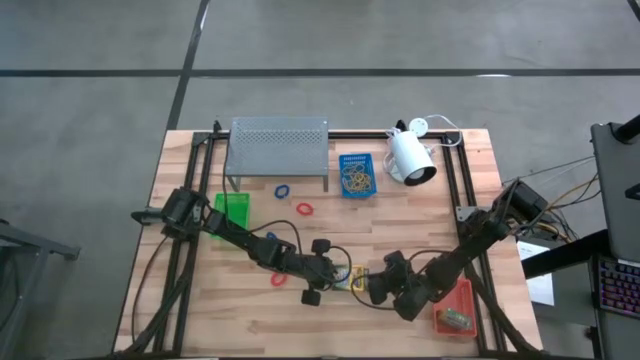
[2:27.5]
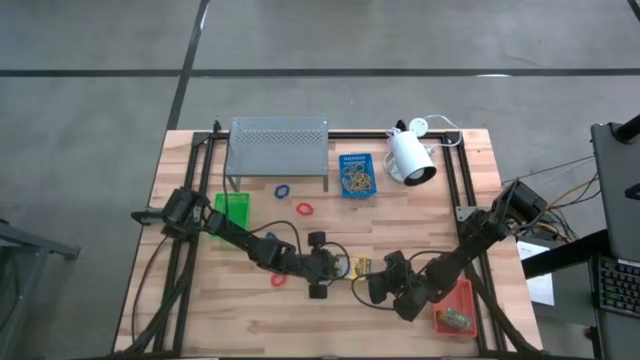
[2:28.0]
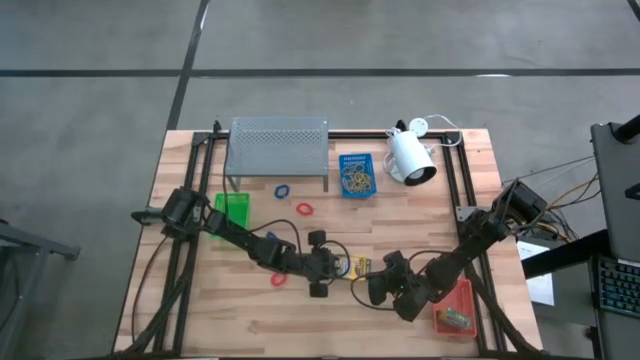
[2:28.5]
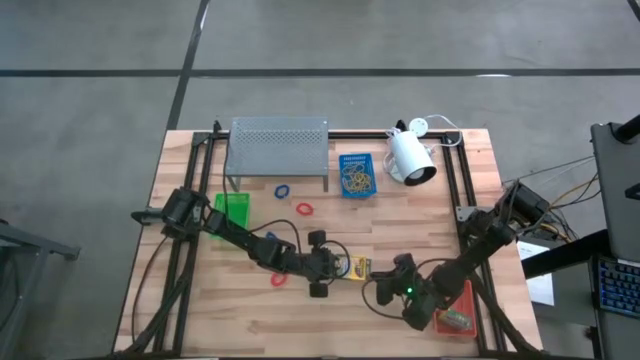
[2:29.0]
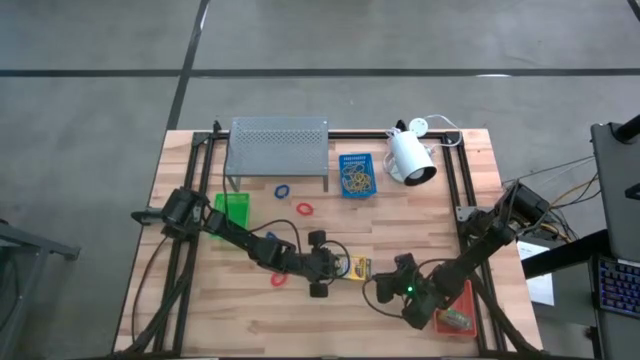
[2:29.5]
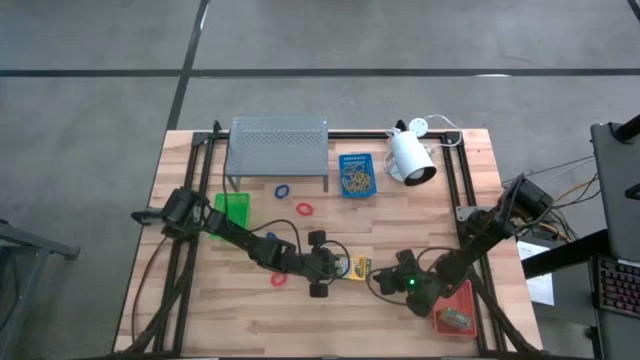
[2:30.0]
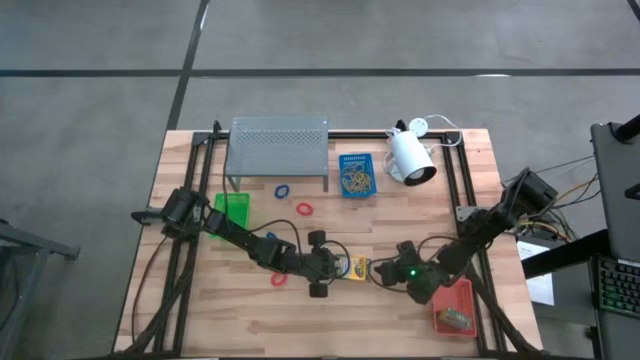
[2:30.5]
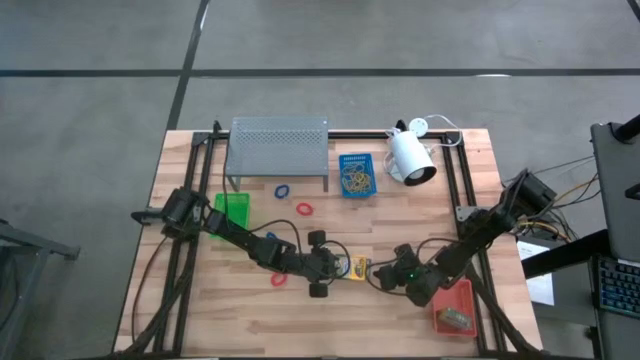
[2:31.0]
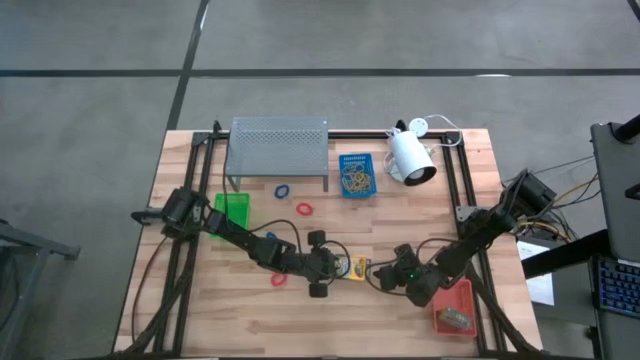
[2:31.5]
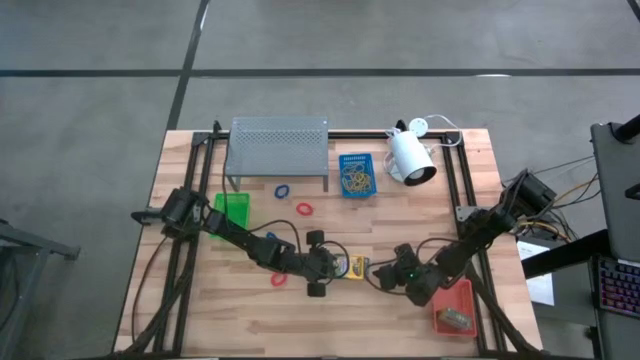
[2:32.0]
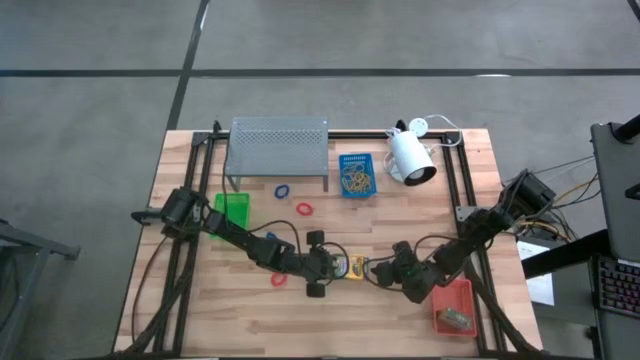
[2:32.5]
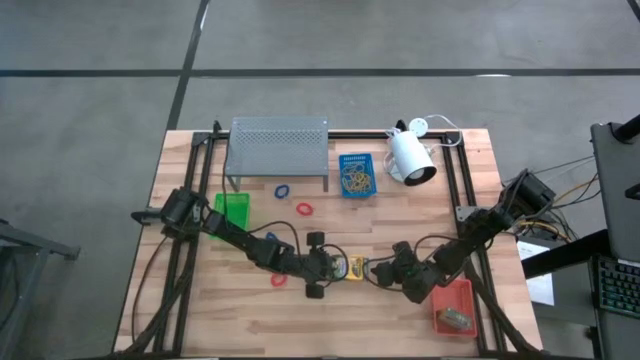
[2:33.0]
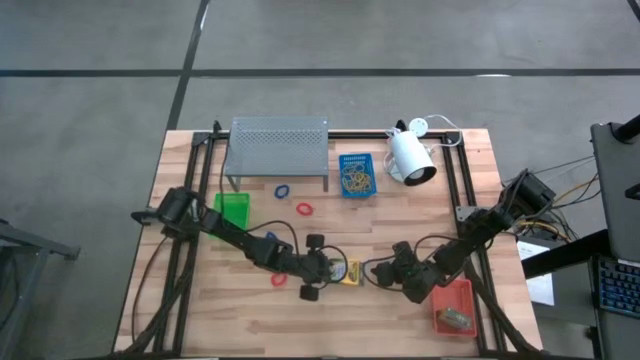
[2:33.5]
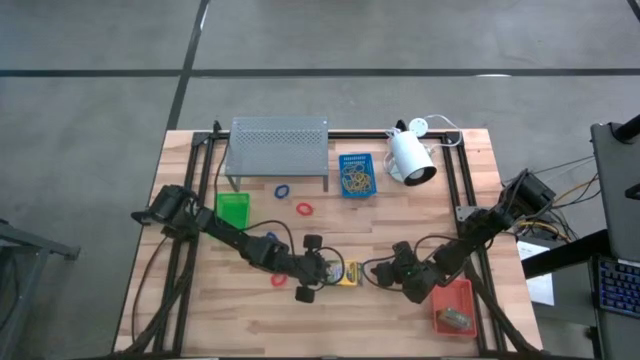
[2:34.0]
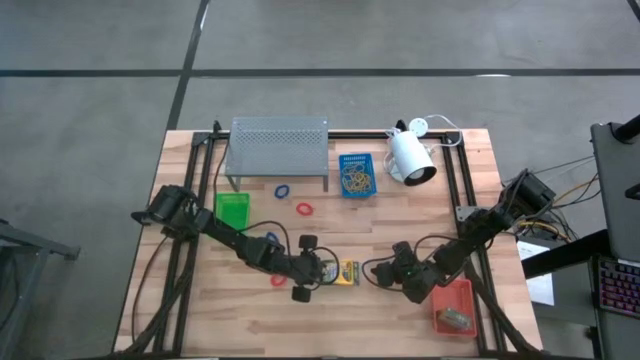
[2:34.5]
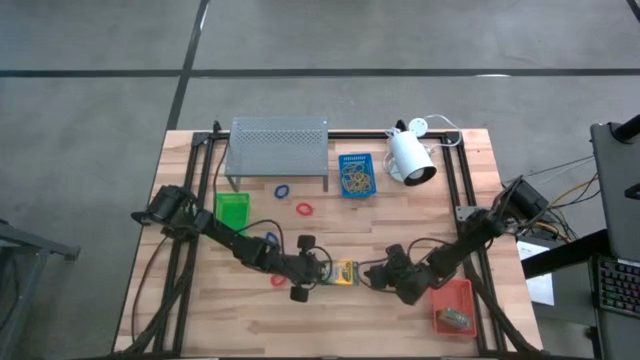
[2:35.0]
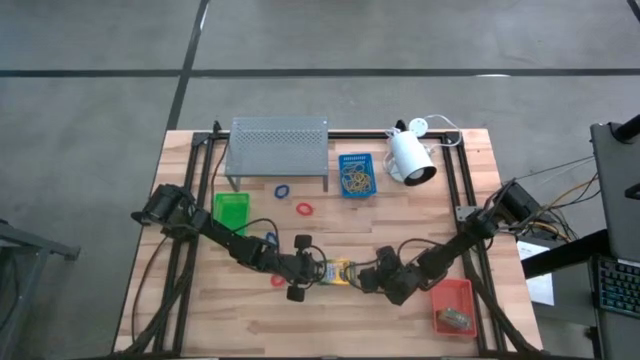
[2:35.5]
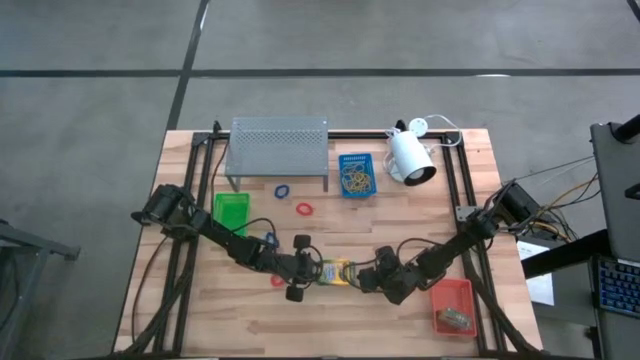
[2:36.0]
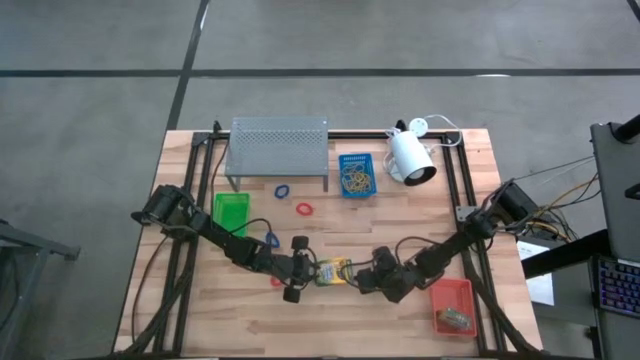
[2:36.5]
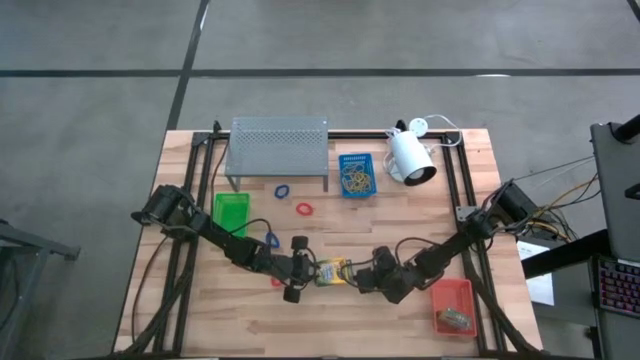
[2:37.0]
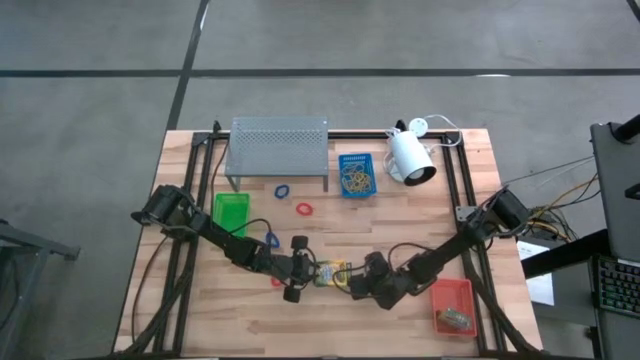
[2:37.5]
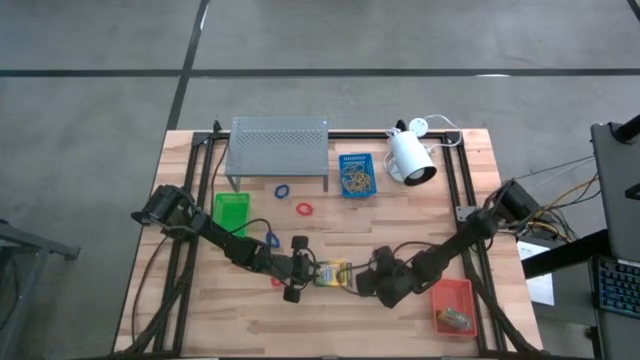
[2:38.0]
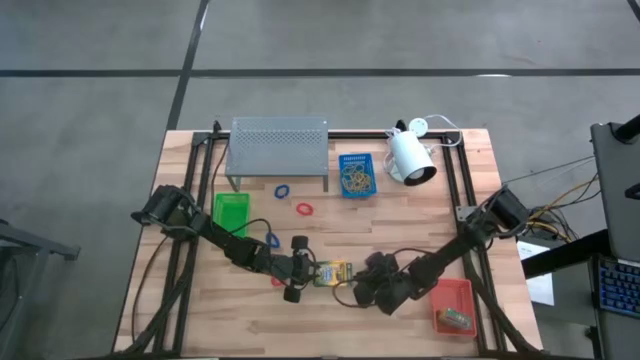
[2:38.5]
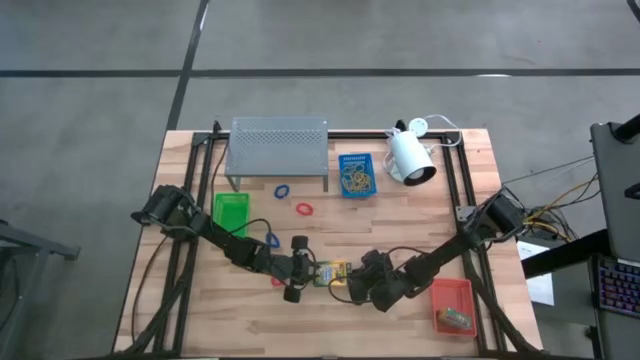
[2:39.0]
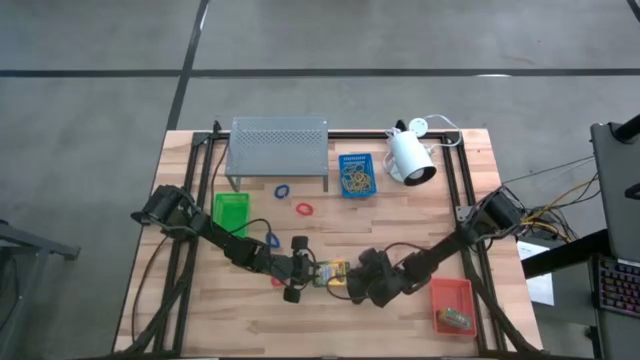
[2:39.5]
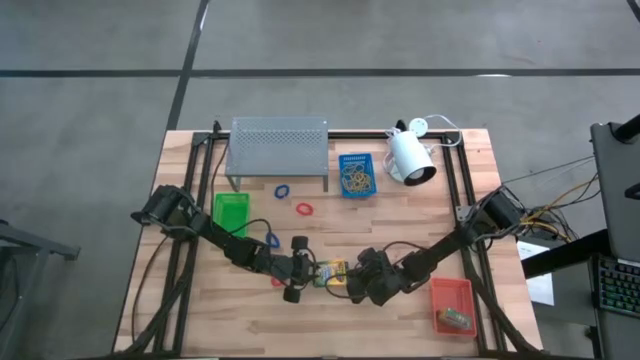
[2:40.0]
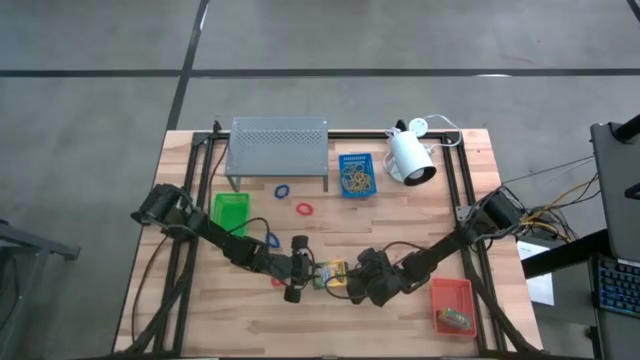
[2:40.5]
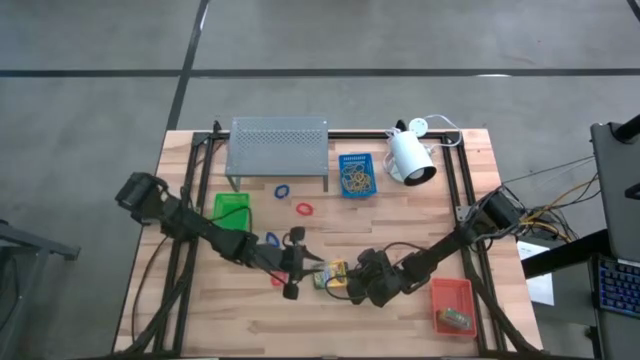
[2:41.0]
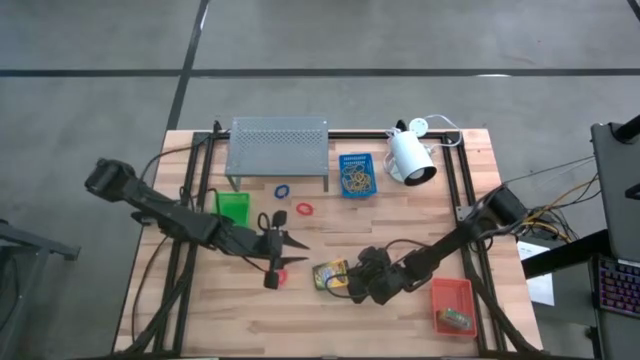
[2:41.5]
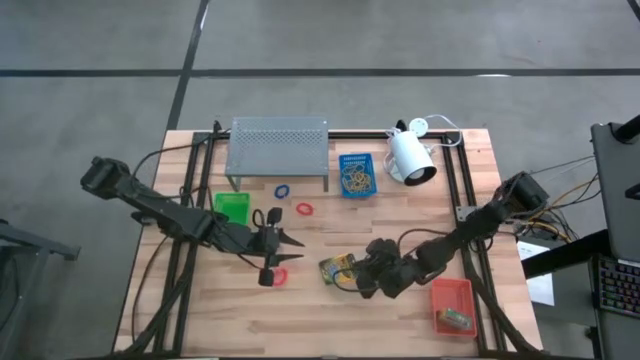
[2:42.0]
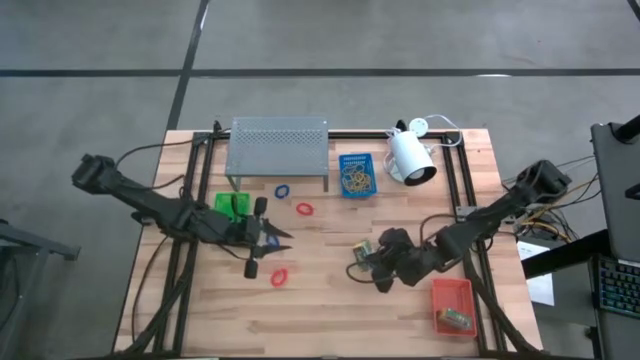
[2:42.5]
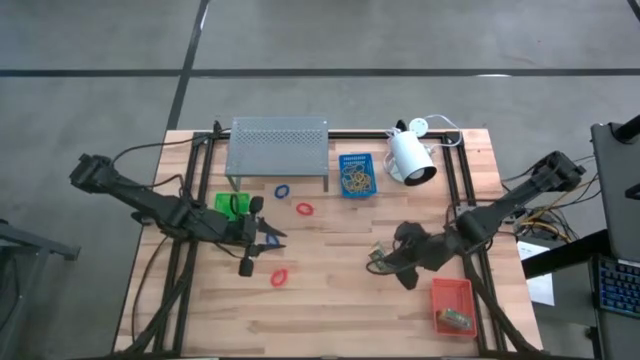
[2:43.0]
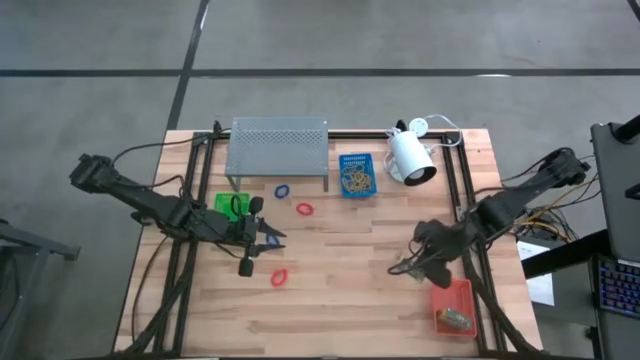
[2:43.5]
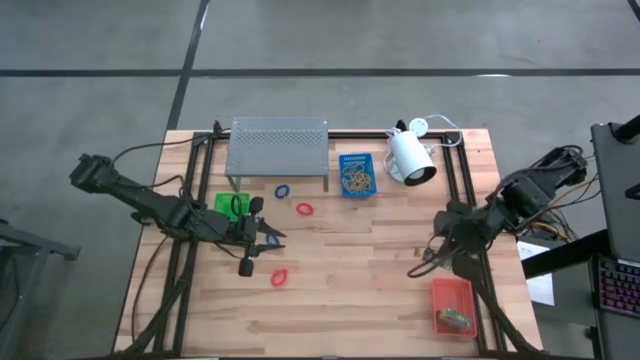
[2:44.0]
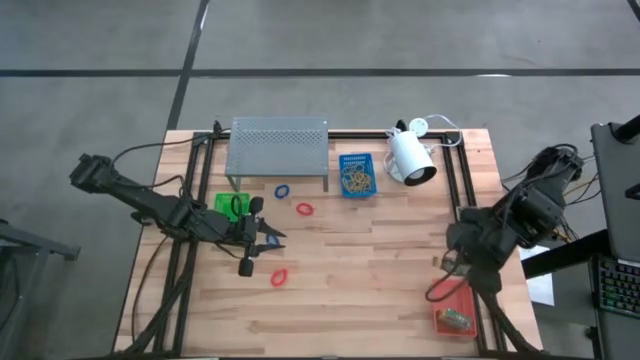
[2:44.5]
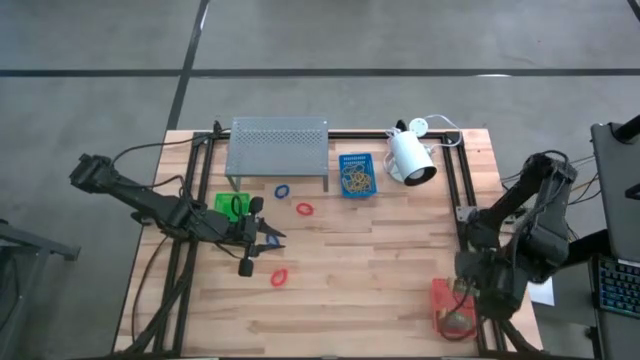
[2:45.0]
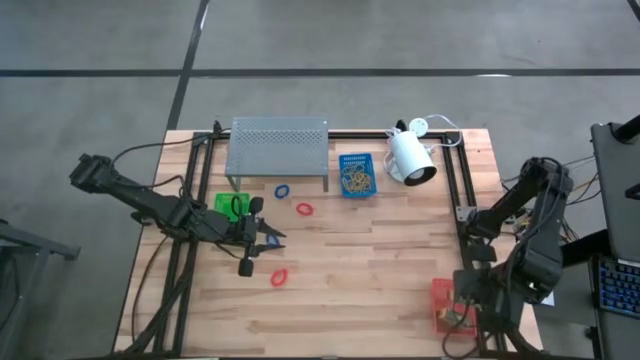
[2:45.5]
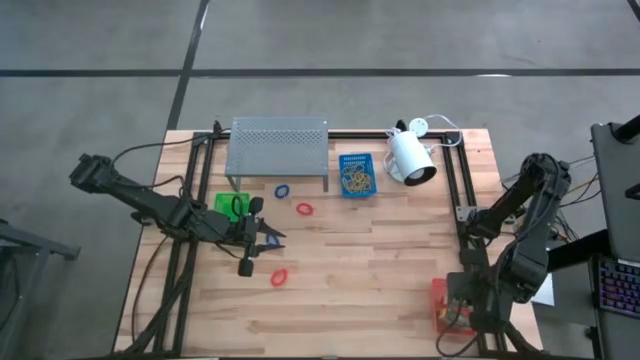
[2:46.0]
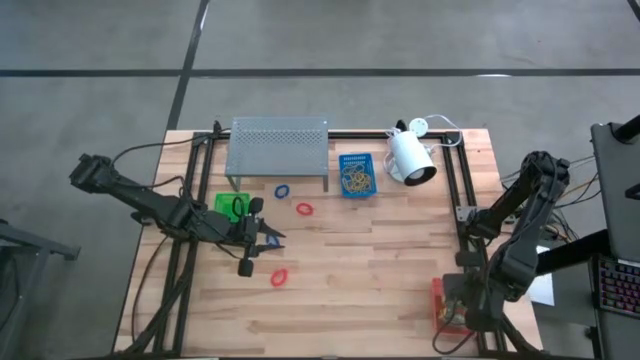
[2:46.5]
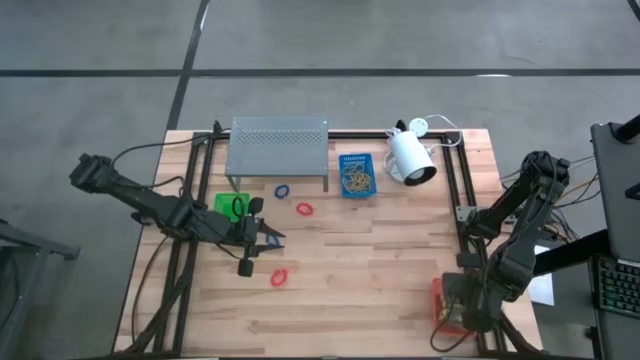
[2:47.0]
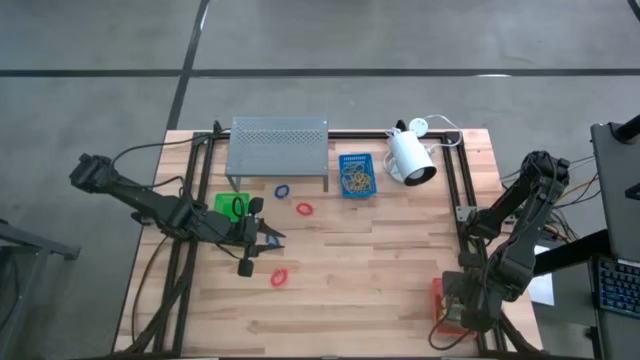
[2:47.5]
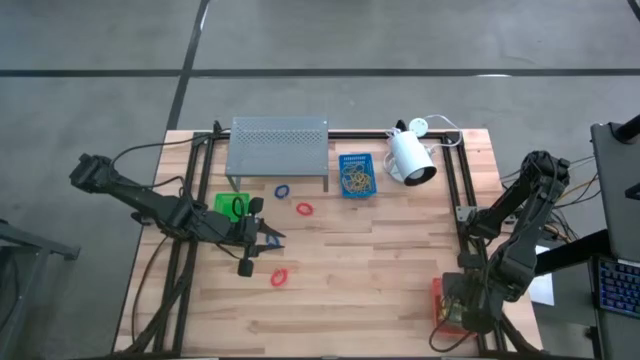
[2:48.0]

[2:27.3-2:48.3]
Task: Pick & Place Office Desk Supplies
Put the big crayon box into the orange bin
